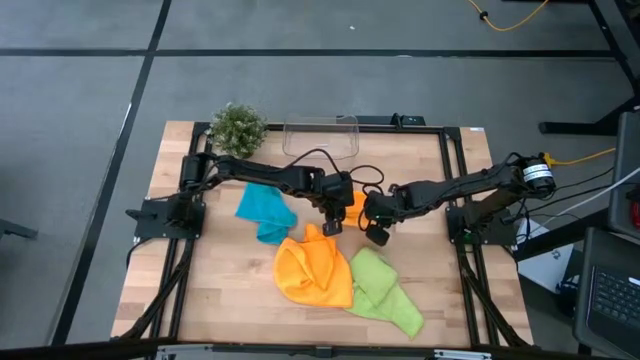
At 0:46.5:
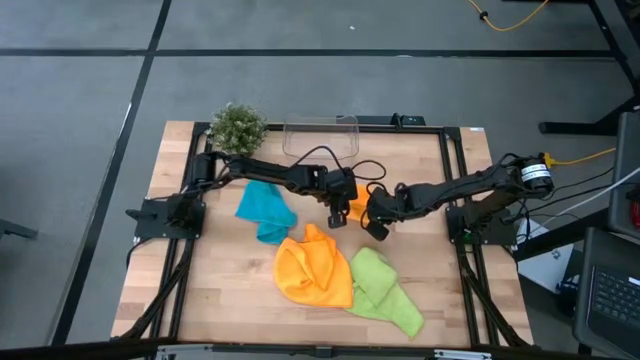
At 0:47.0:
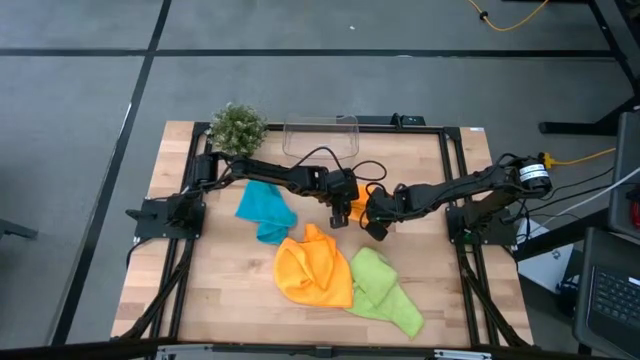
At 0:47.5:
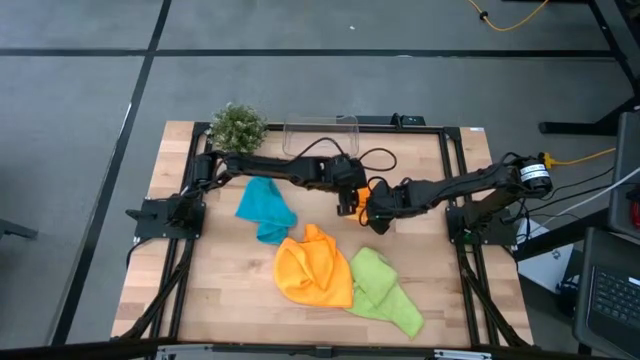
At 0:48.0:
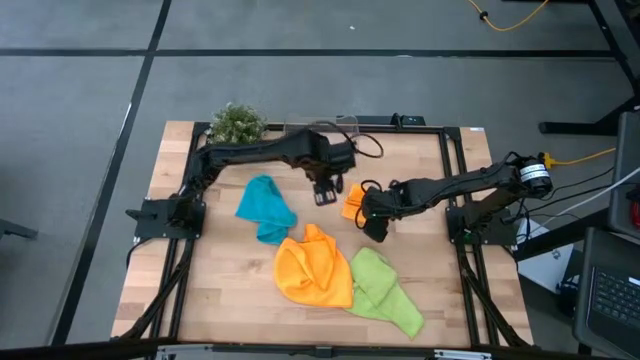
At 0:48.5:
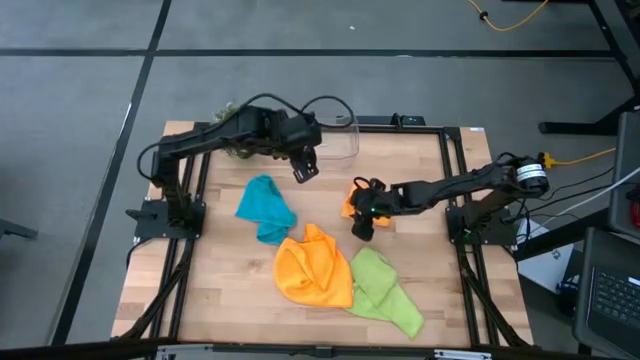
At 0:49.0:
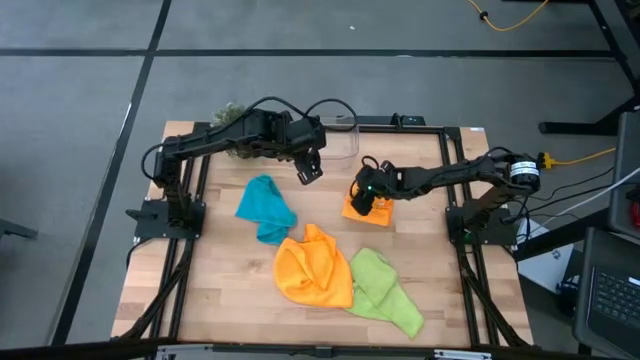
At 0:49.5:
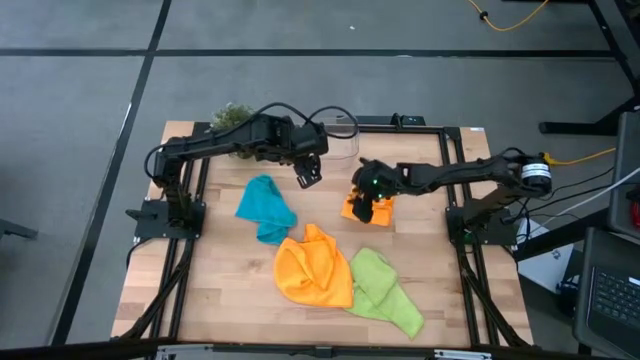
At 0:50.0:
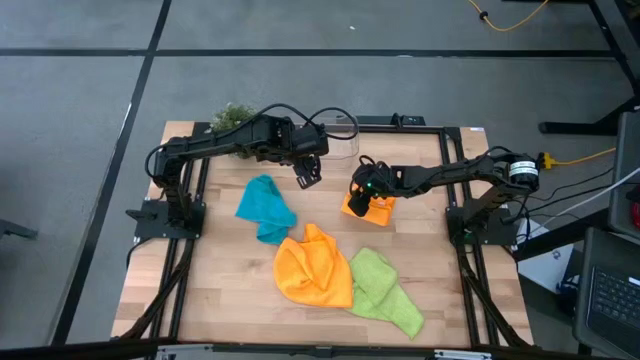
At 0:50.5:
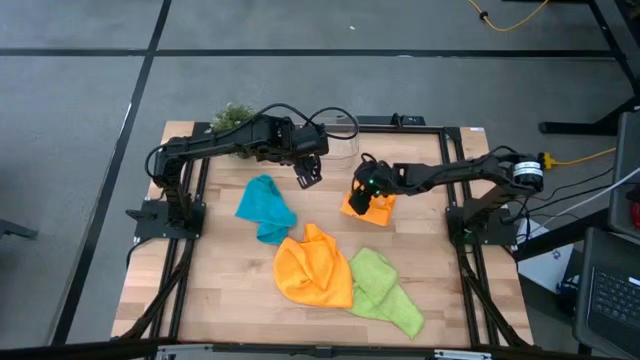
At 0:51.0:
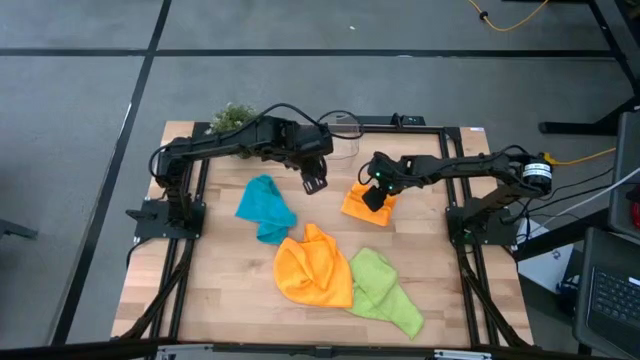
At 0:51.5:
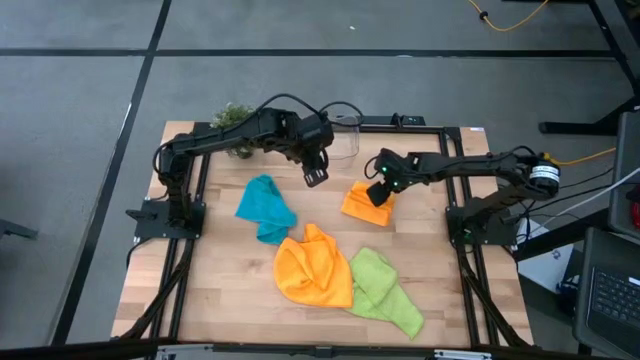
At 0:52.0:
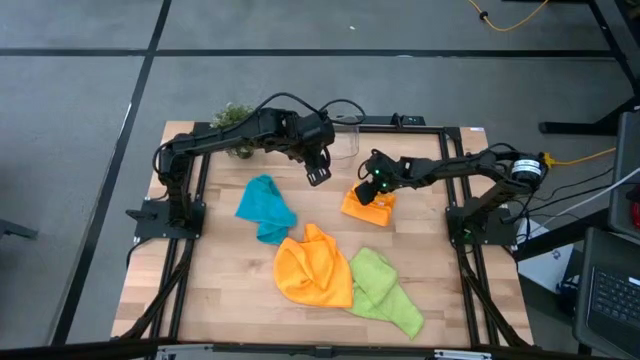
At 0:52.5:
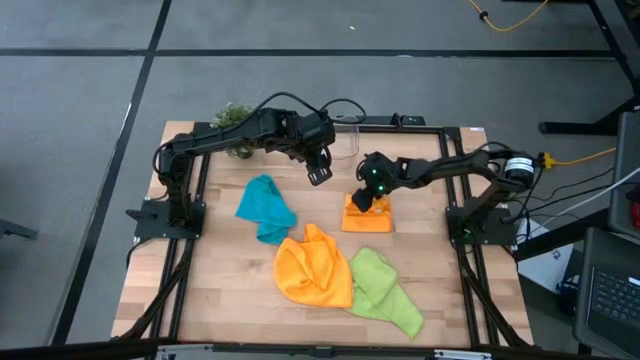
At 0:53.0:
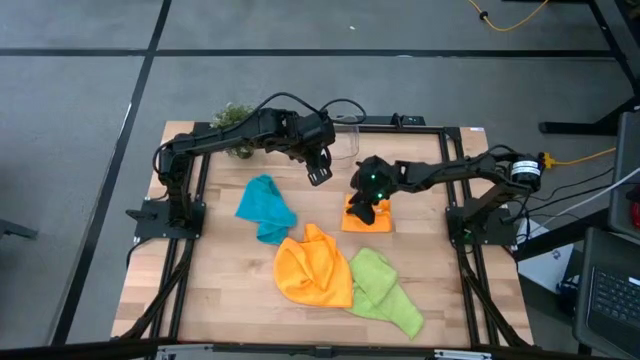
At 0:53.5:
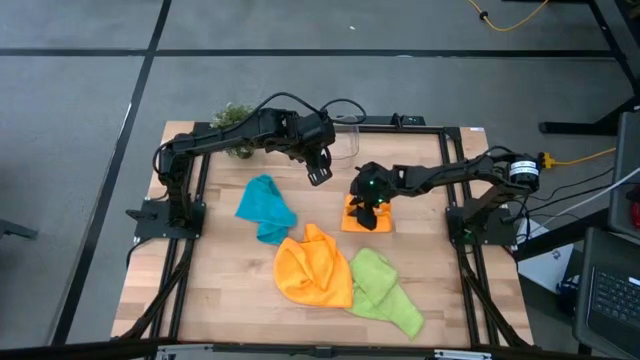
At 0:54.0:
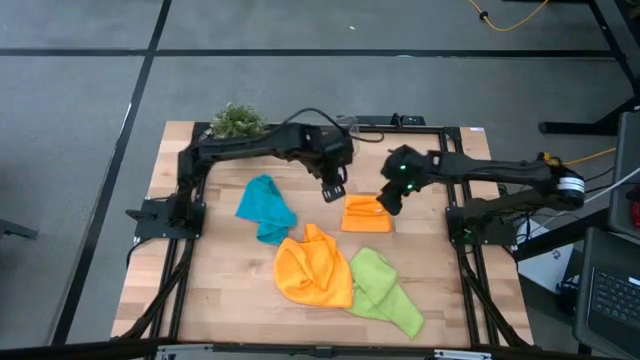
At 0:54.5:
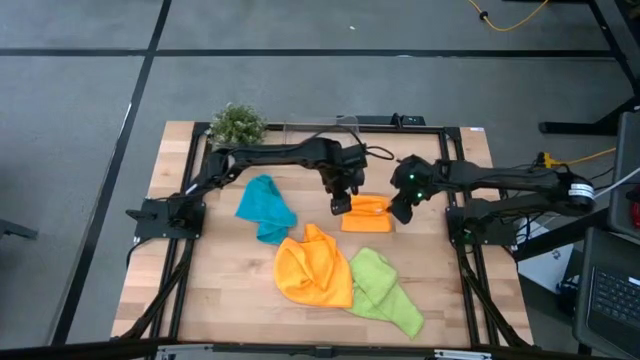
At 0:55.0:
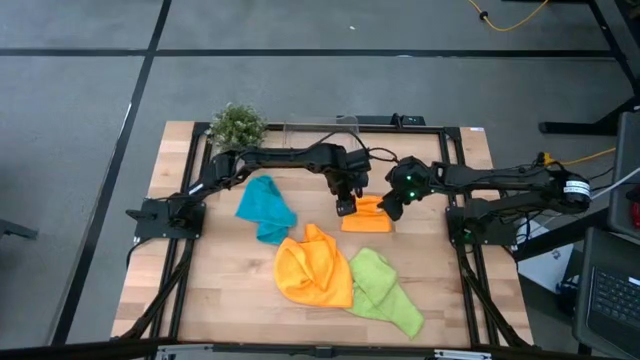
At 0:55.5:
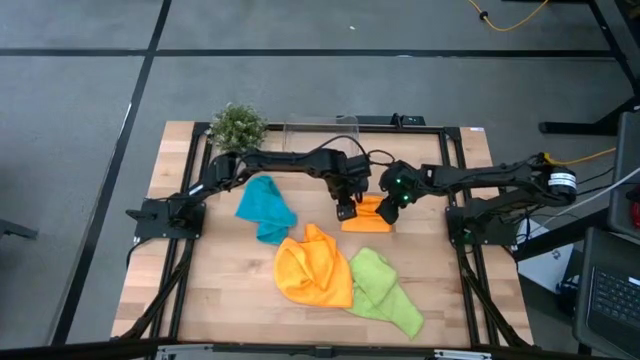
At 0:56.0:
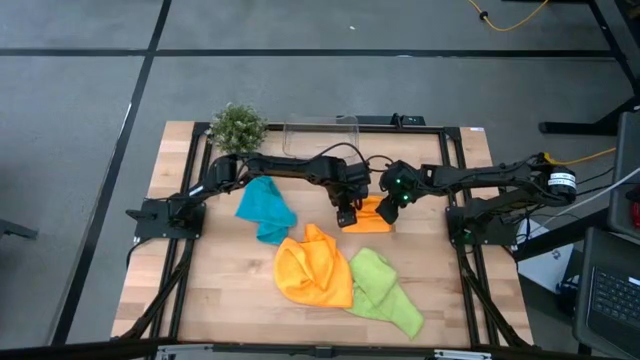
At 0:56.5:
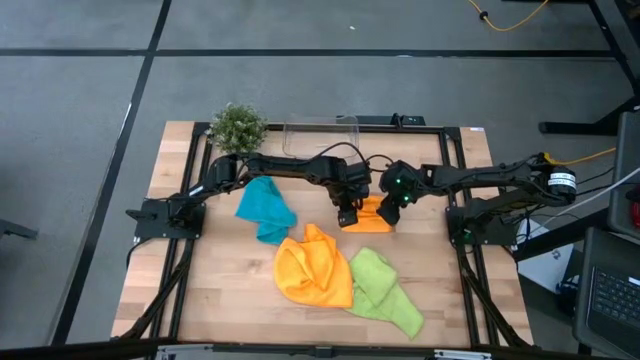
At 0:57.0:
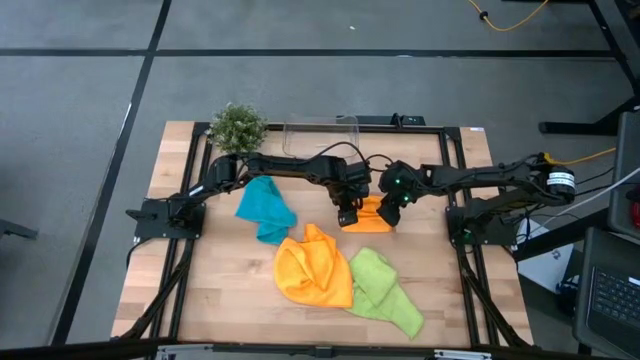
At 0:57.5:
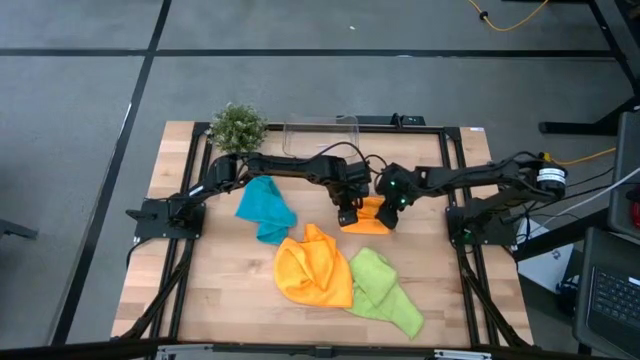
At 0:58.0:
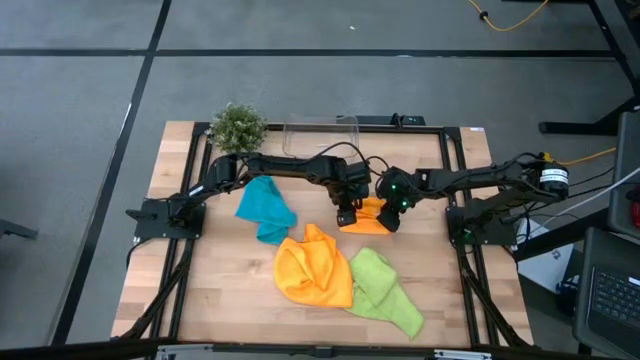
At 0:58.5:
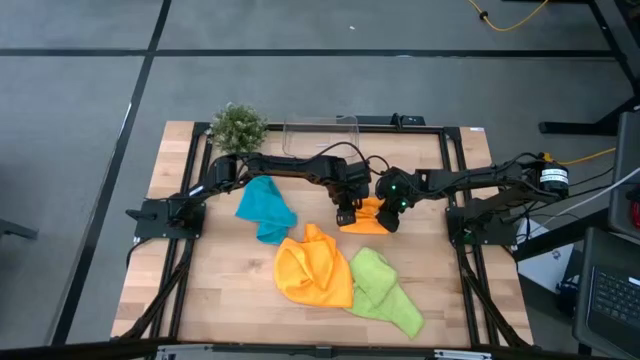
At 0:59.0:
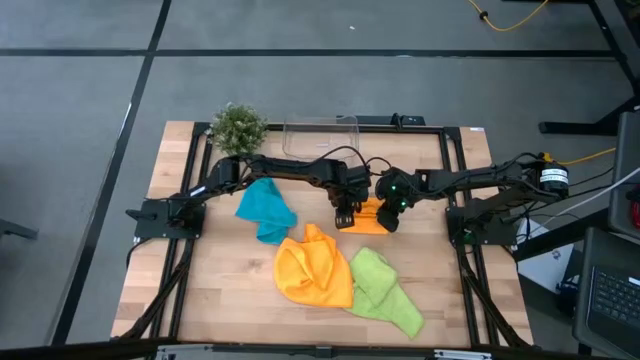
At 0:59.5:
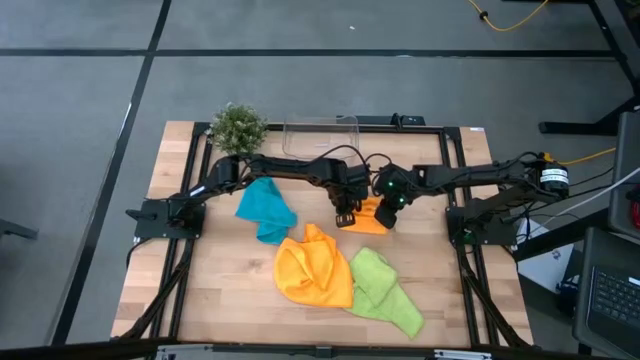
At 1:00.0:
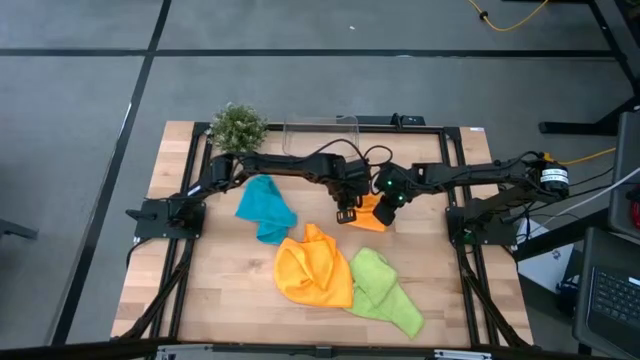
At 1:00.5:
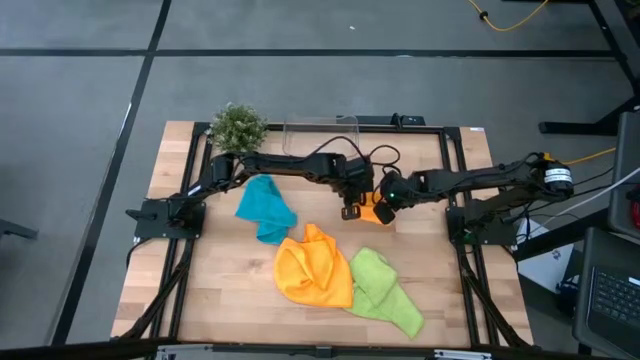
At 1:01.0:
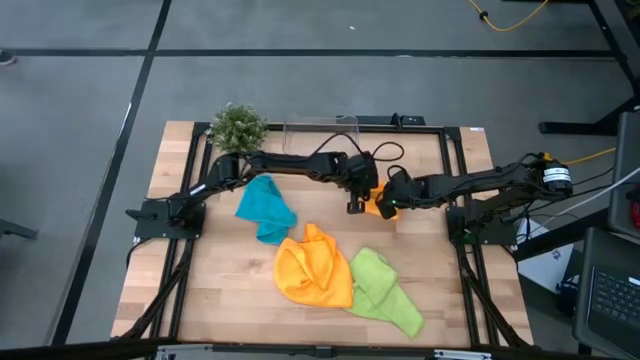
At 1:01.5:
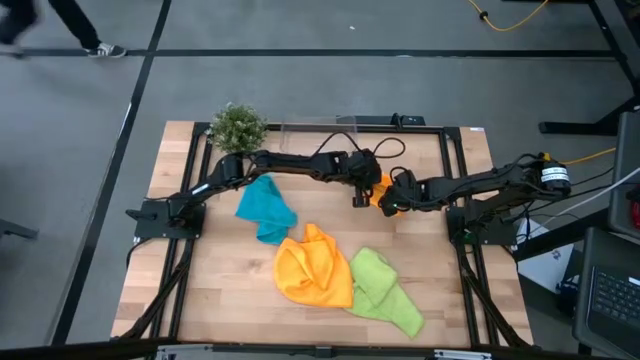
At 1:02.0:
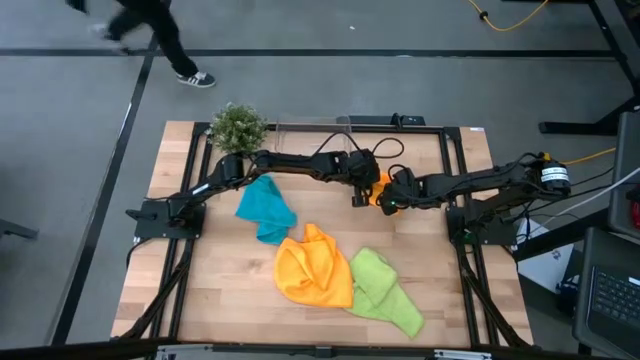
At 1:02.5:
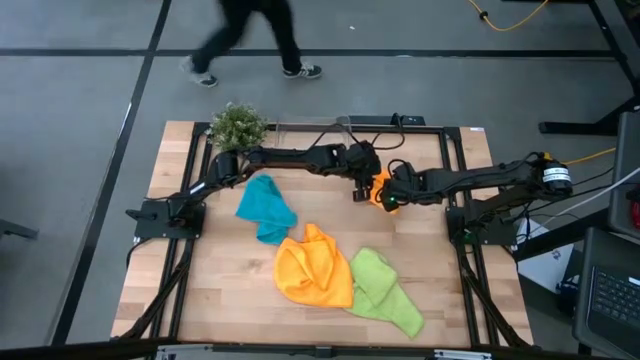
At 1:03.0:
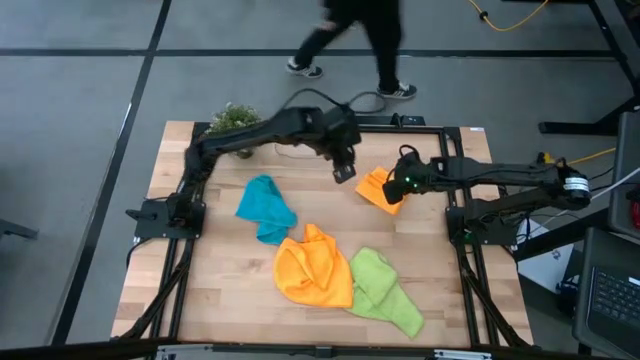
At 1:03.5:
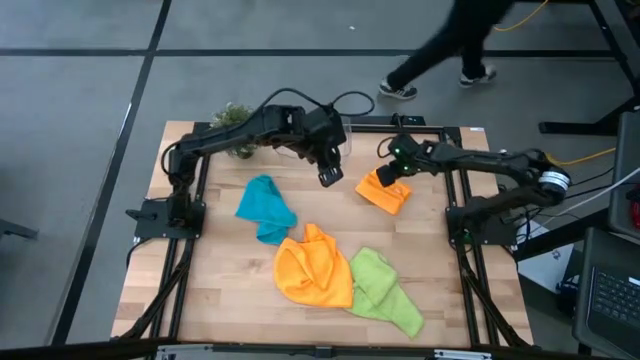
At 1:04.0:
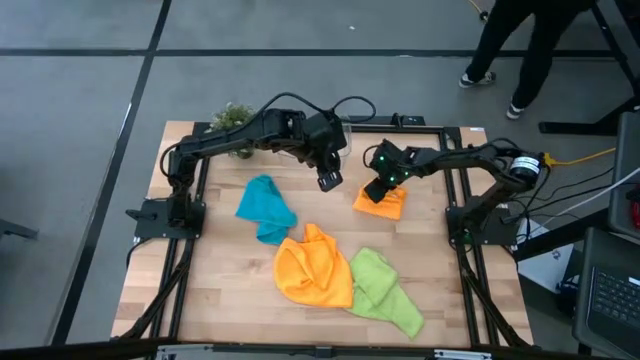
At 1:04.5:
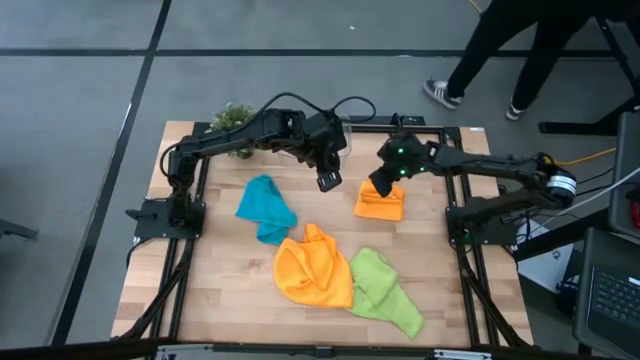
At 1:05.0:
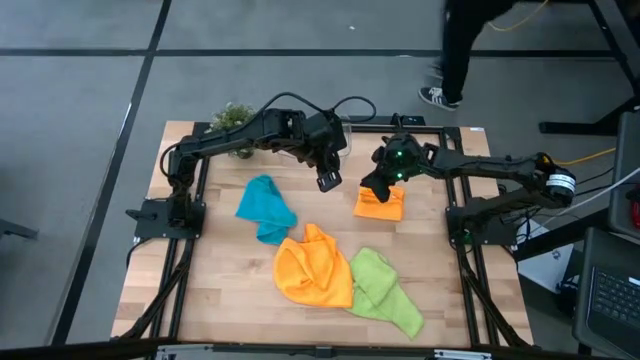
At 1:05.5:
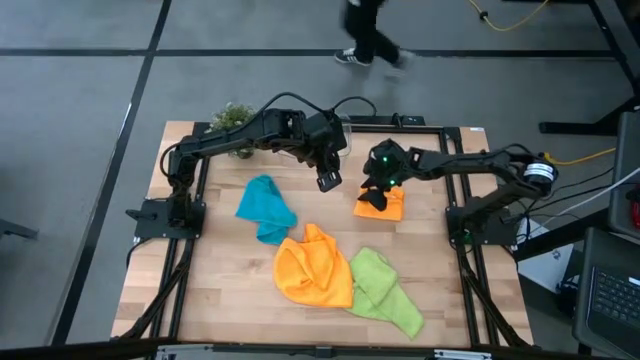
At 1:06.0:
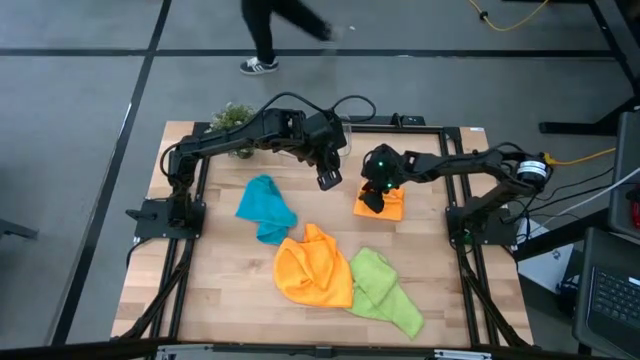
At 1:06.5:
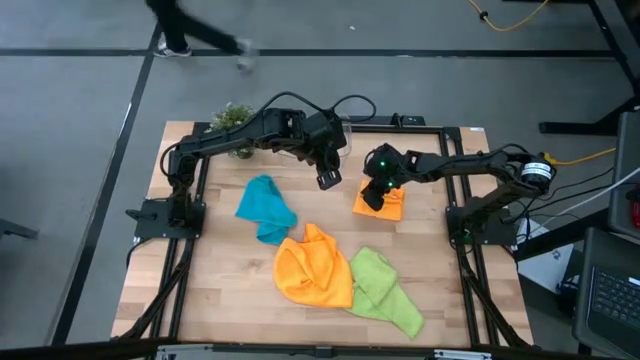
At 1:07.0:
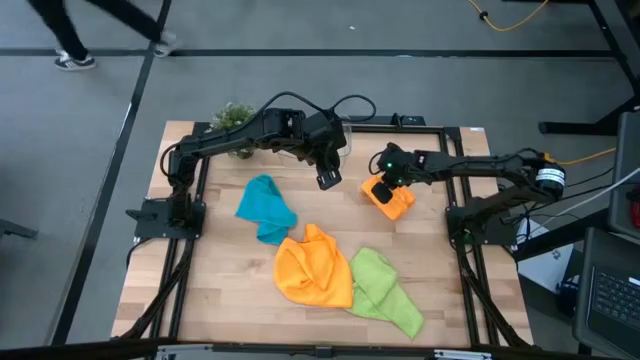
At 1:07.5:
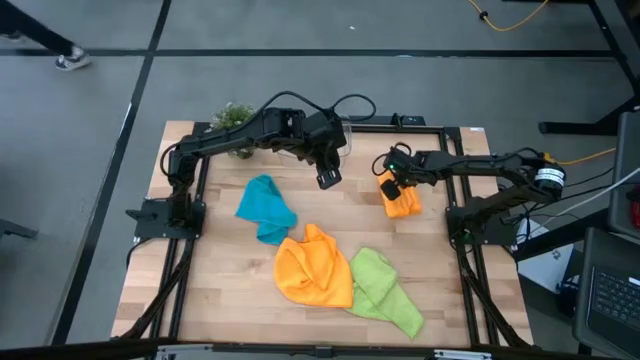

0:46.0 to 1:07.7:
Task: Fold microfiber towels
Fold the top orange microfiber cloth
